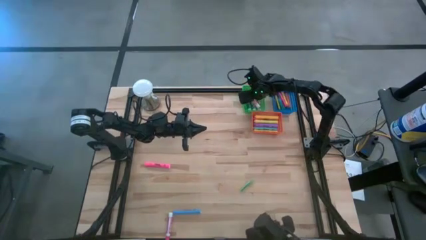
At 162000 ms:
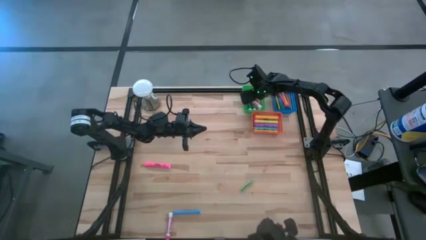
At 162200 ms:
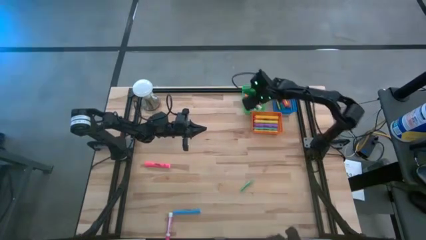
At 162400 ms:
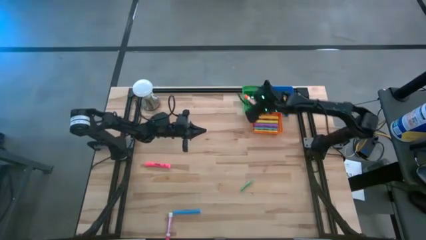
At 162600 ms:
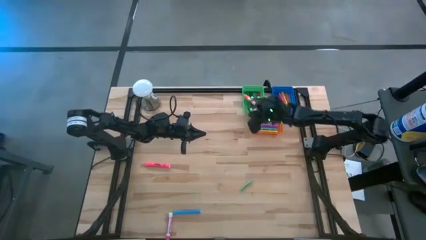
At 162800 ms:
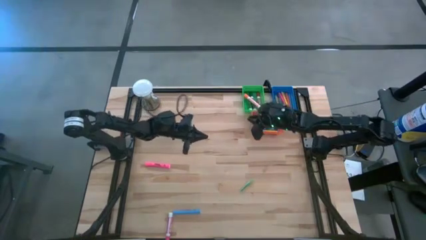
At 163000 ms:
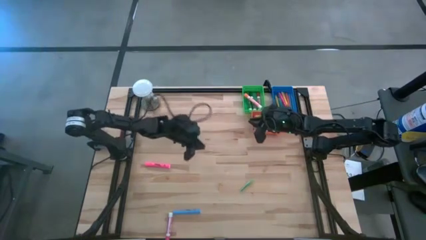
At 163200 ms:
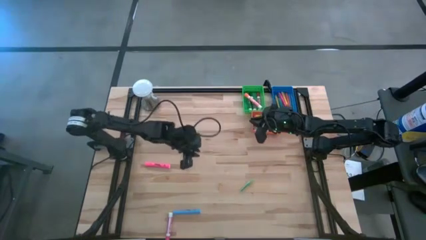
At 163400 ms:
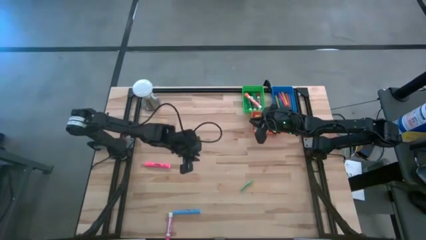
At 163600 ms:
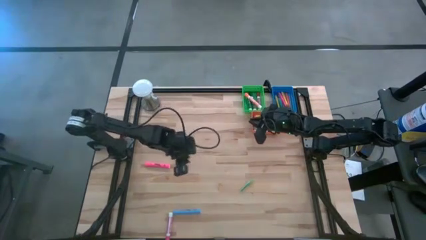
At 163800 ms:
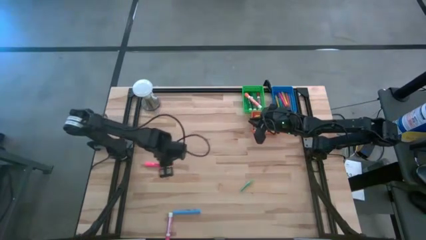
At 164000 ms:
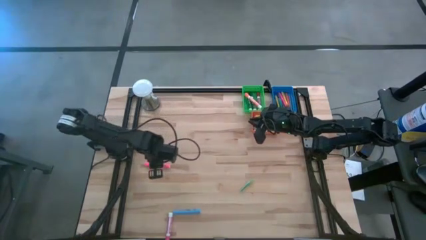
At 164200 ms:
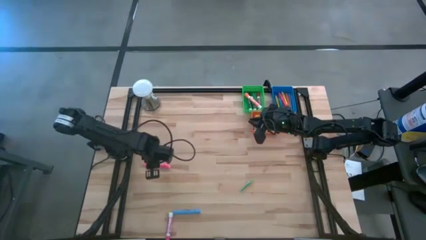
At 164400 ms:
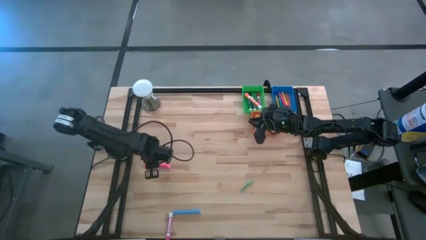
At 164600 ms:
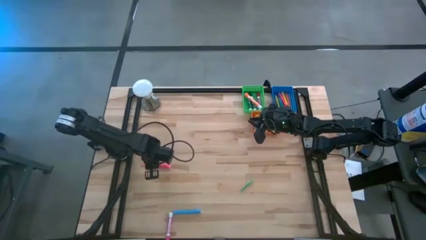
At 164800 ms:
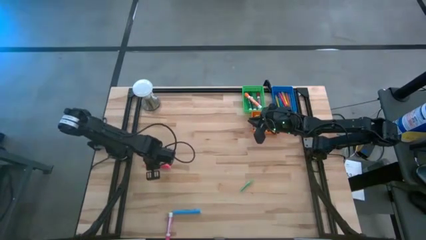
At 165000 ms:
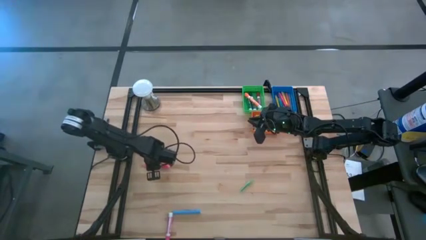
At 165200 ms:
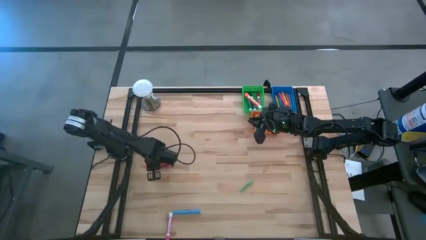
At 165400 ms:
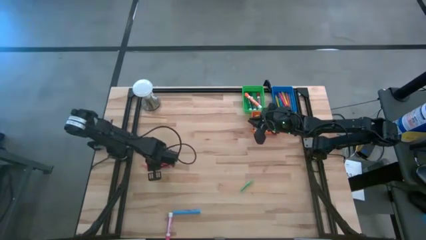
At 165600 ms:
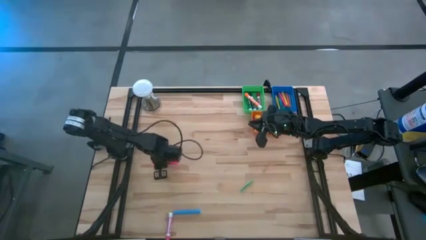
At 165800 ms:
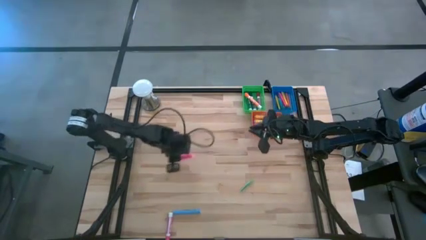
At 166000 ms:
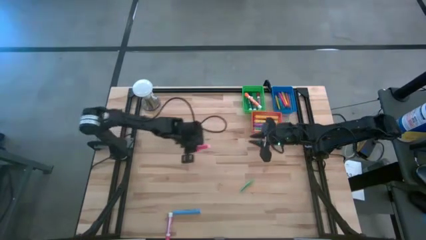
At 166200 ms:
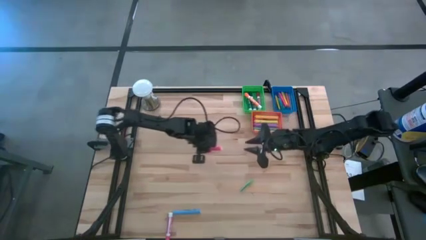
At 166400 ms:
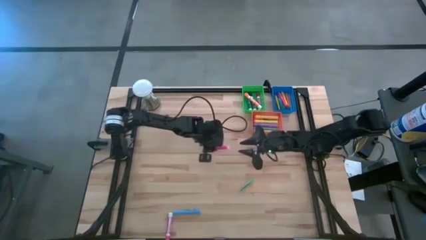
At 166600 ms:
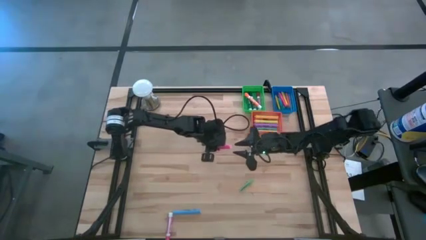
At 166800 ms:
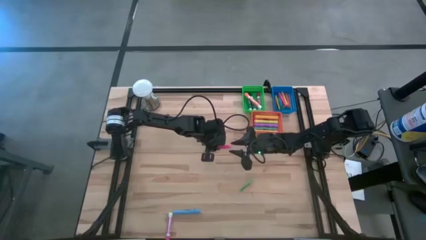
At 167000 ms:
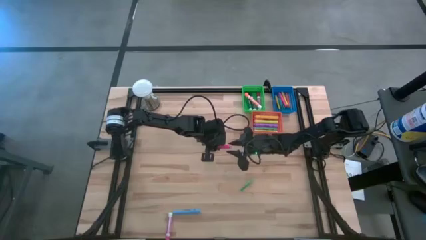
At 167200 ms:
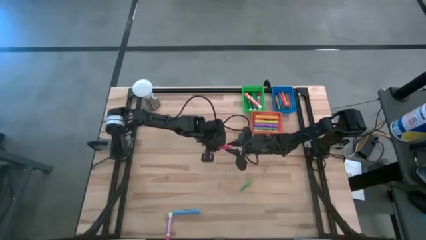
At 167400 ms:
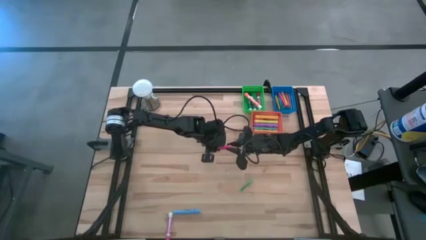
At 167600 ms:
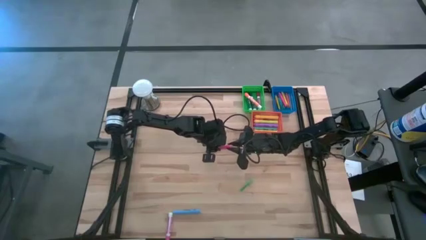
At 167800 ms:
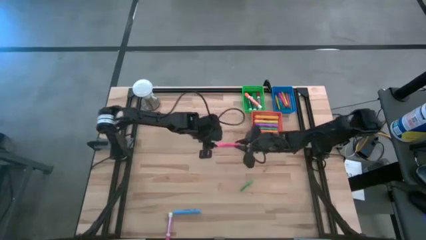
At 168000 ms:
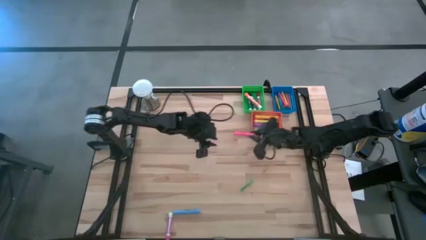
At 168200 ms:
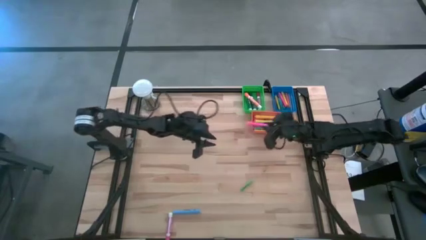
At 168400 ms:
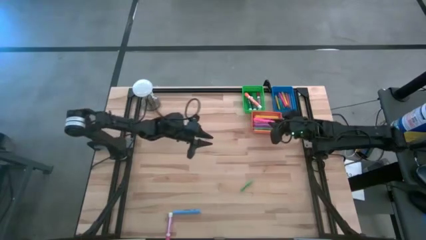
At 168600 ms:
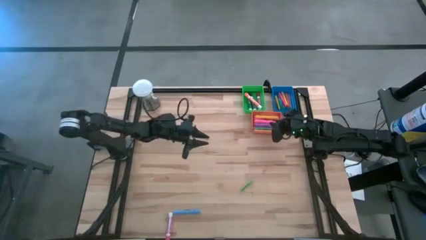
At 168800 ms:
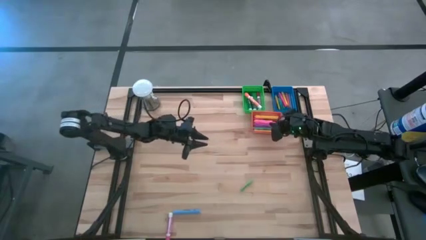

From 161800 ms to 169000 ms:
Task: Pick & Place Markers
Put the pink highlighter pen into the orange bin

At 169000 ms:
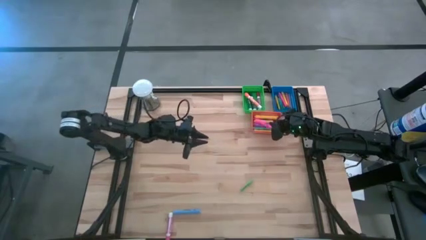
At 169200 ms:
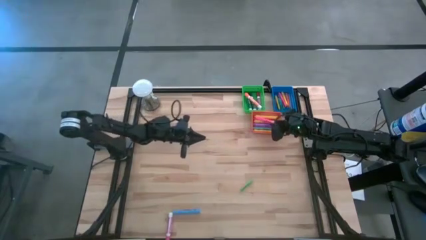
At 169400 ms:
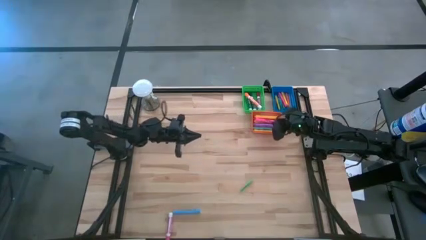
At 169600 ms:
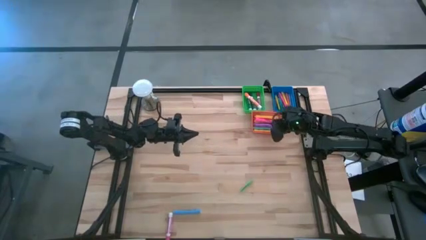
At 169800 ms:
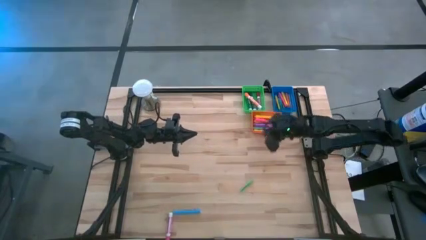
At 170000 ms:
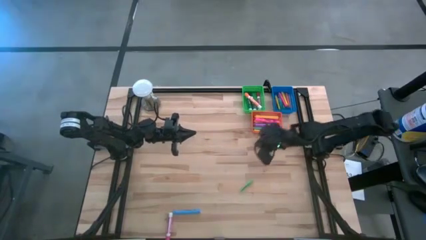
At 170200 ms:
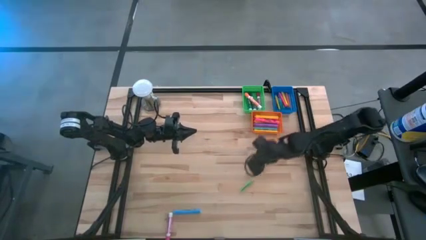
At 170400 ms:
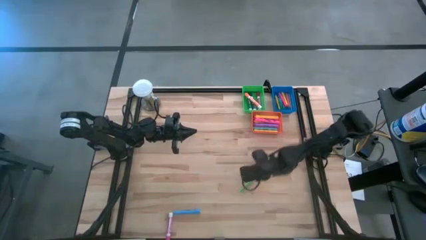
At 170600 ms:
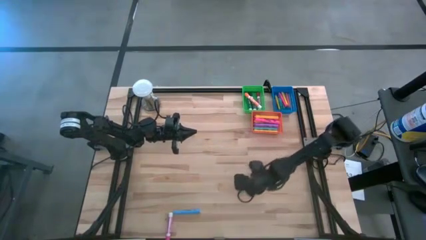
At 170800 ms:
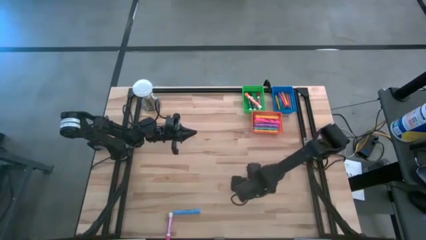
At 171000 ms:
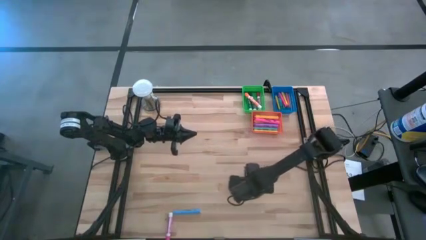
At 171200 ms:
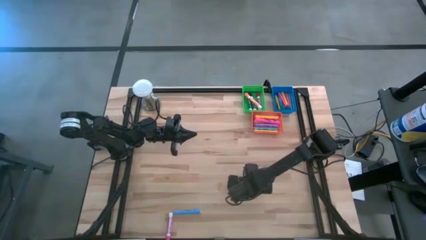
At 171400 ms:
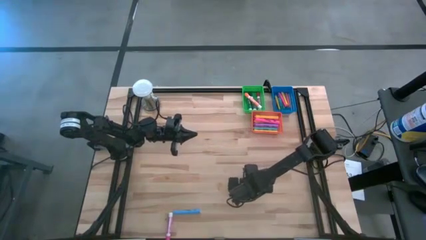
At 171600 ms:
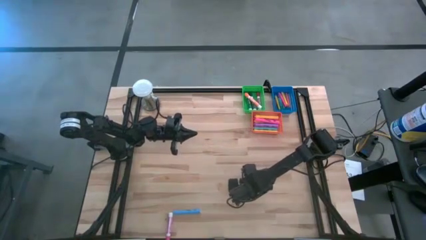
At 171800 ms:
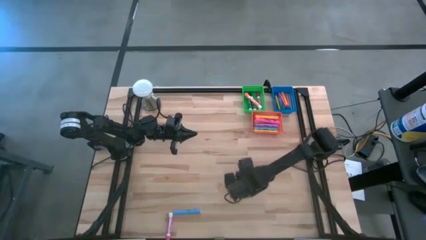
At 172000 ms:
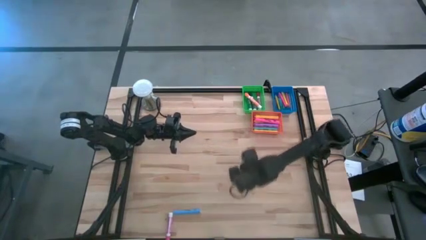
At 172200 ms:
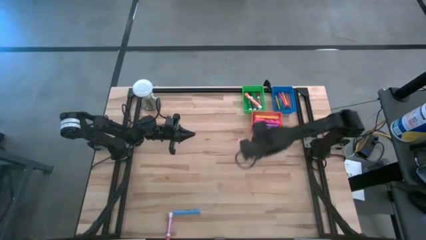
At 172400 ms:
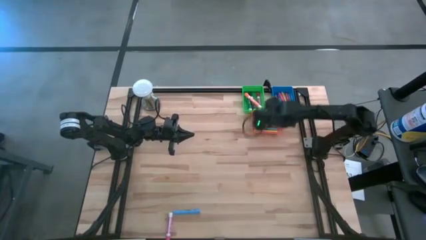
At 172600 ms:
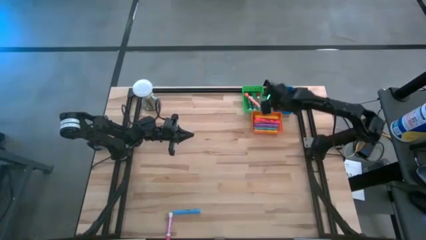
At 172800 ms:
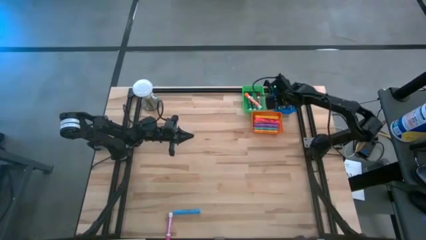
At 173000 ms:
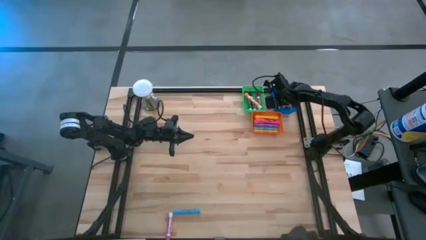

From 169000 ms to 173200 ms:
Put the green pen into the blue bin

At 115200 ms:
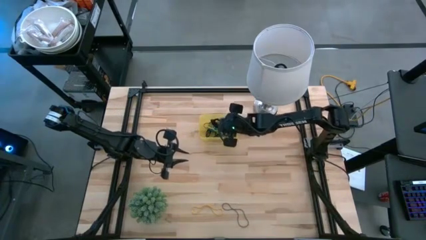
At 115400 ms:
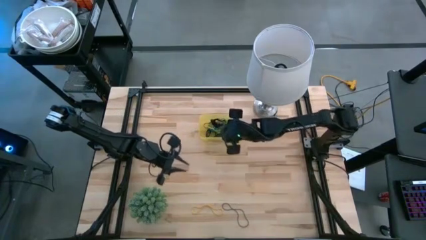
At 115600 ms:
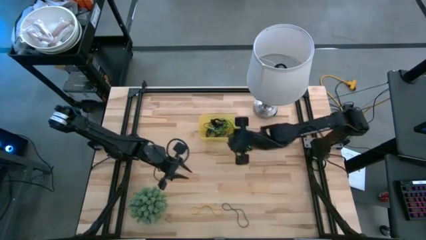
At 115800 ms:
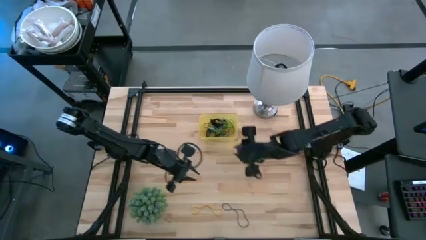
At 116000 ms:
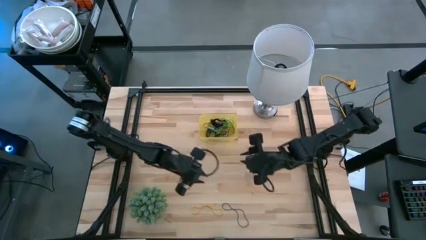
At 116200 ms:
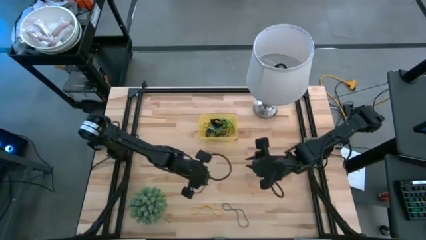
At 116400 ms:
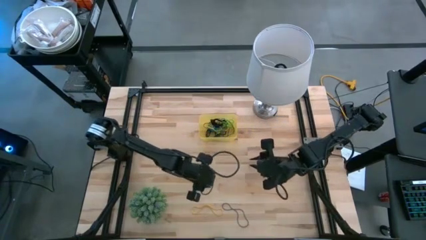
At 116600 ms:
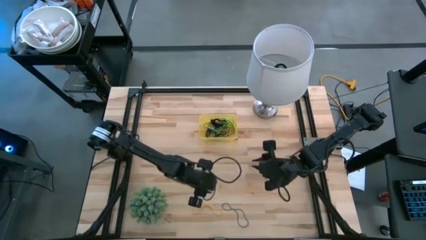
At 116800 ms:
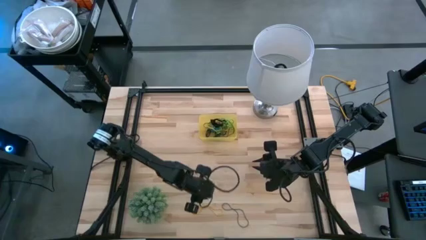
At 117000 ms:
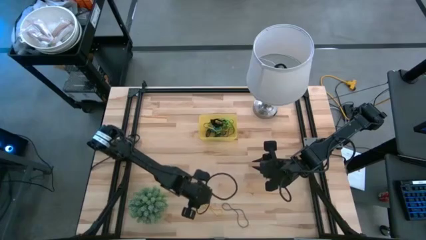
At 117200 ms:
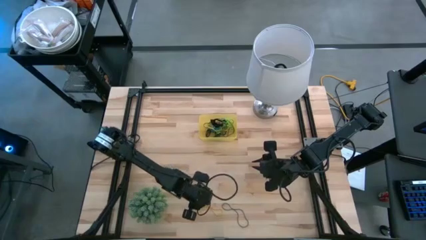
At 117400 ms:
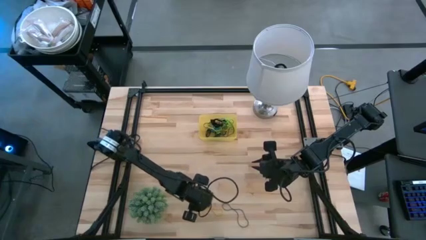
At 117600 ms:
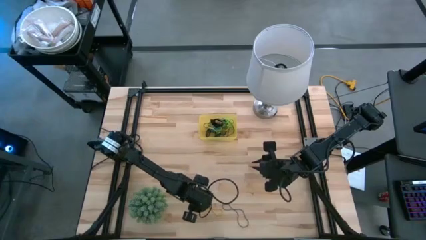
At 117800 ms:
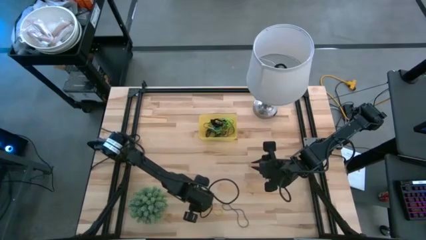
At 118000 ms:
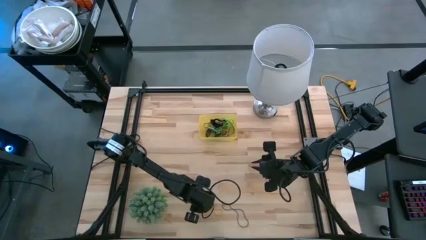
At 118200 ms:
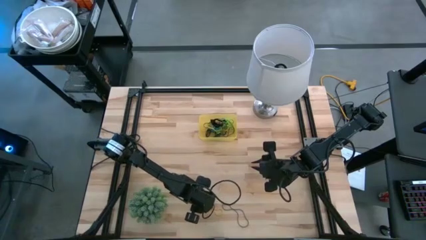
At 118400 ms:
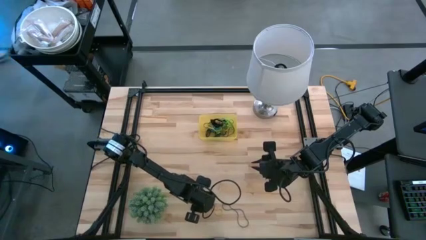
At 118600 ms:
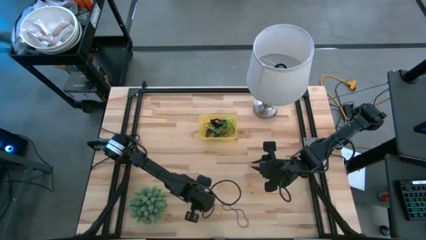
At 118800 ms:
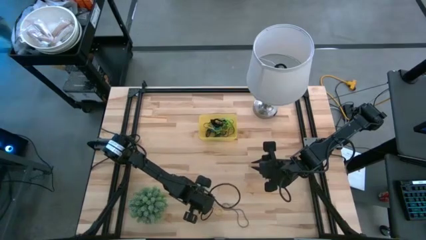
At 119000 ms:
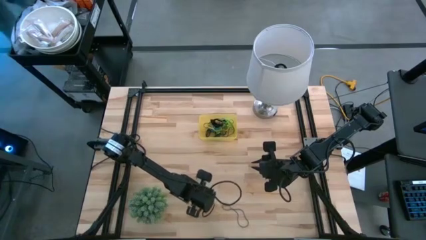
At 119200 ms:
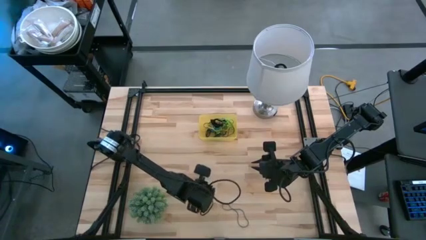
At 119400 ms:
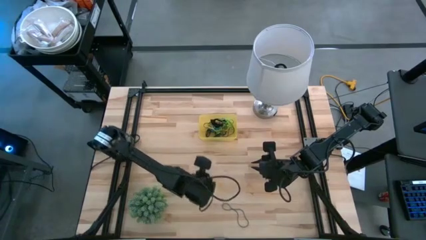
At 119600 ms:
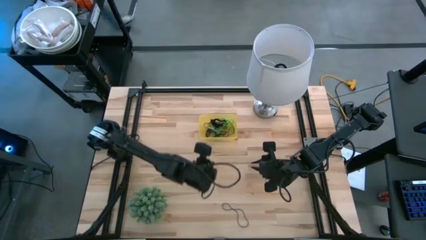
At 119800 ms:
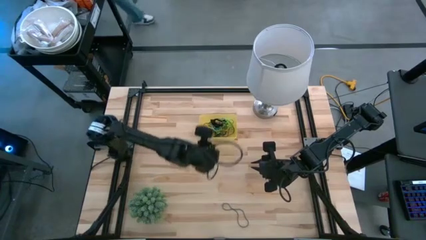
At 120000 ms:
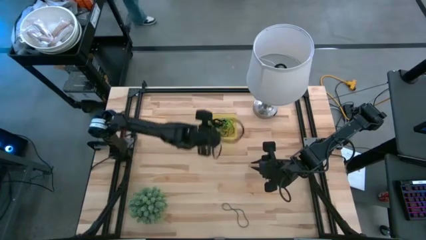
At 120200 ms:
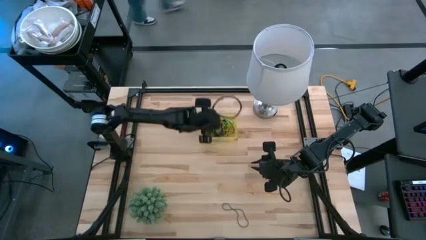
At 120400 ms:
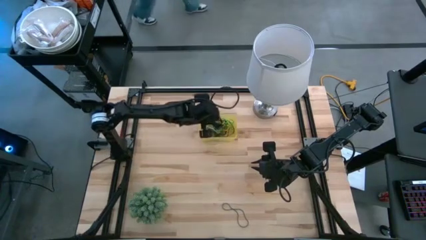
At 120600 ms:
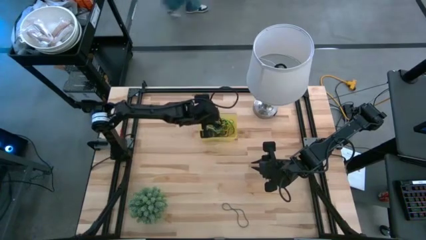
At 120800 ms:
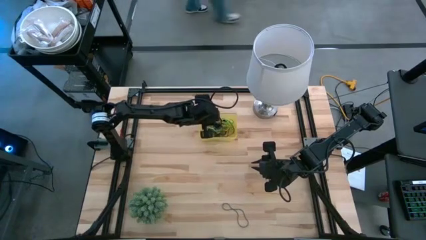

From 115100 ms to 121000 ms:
Task: Pick and place rubber bands into bin
Put the yellow rubber band into the yellow bin
